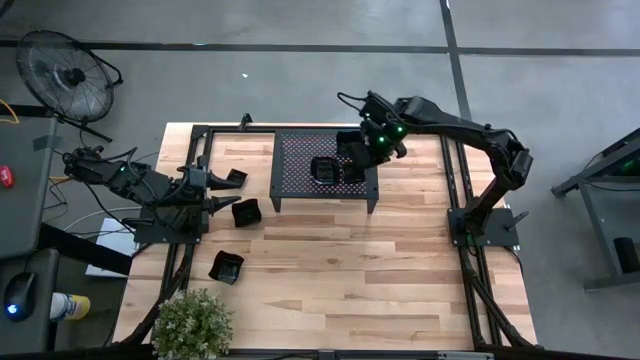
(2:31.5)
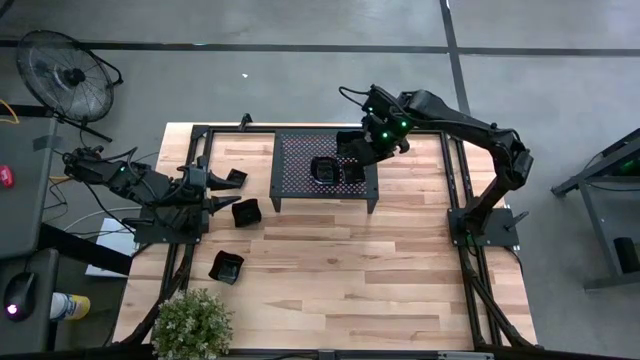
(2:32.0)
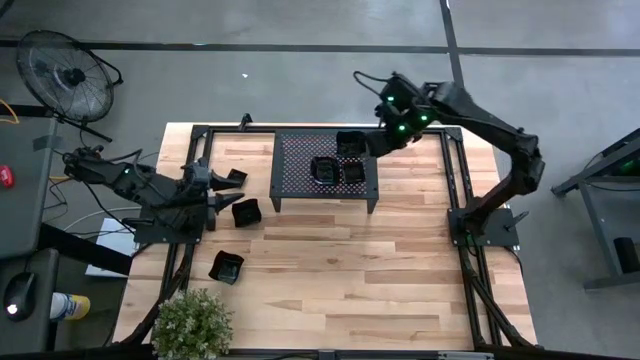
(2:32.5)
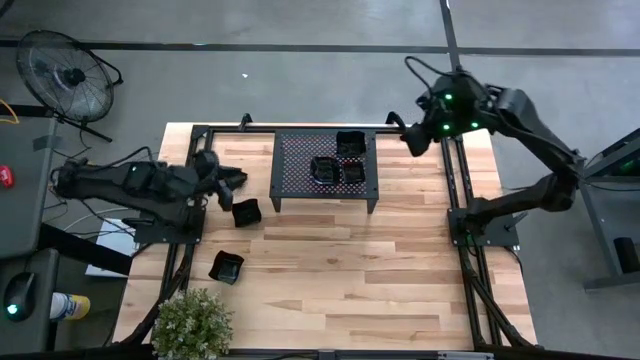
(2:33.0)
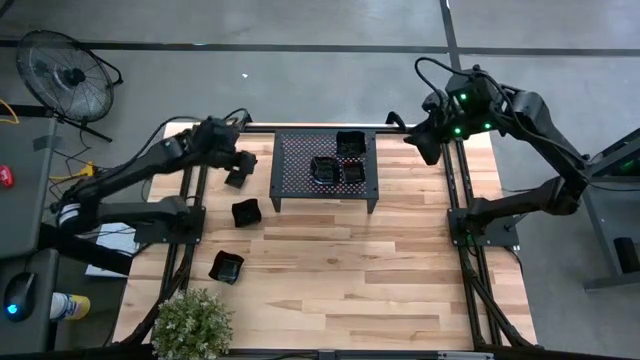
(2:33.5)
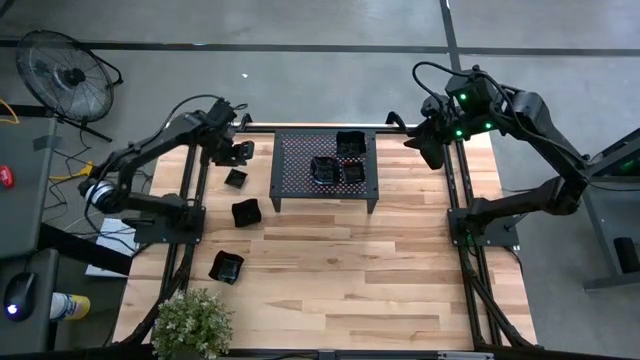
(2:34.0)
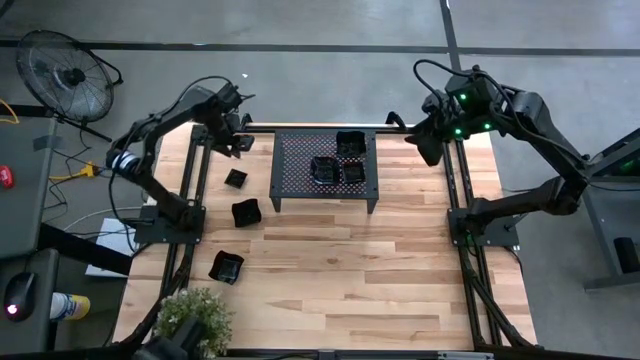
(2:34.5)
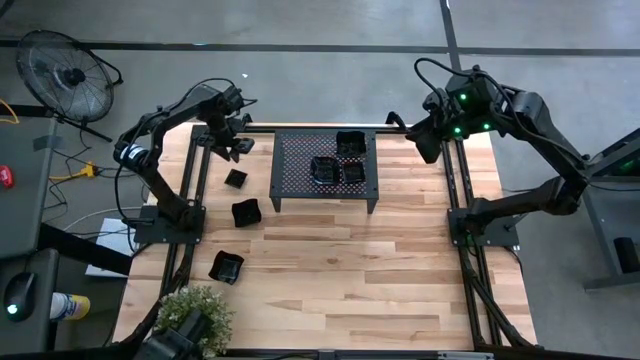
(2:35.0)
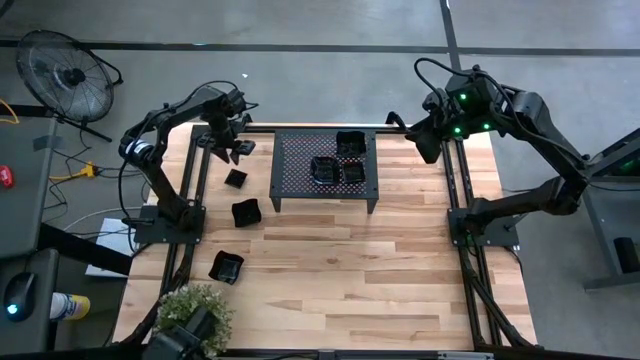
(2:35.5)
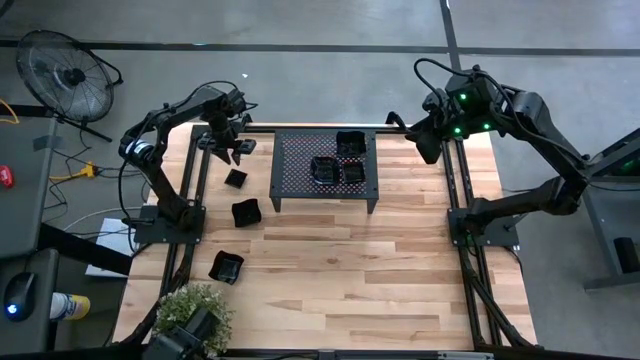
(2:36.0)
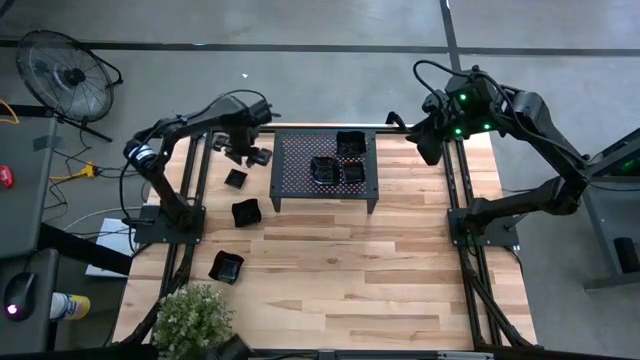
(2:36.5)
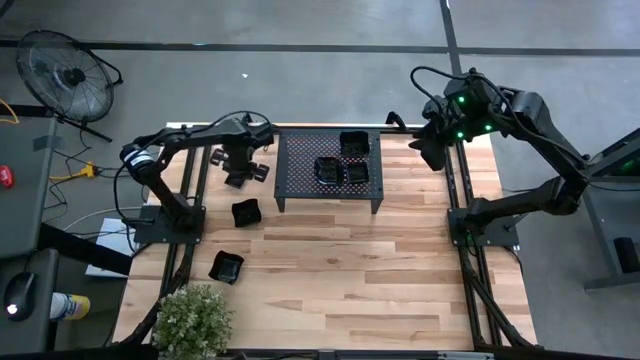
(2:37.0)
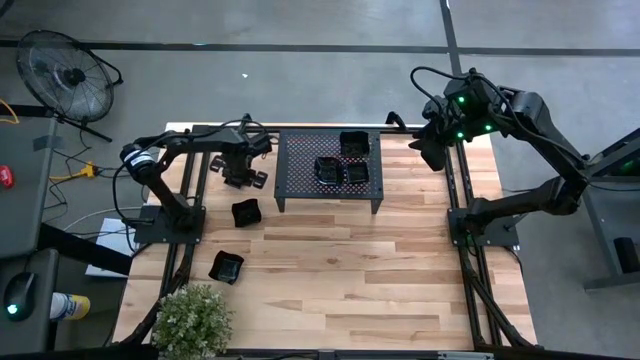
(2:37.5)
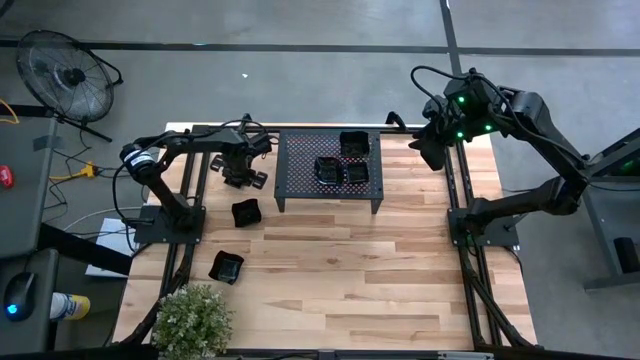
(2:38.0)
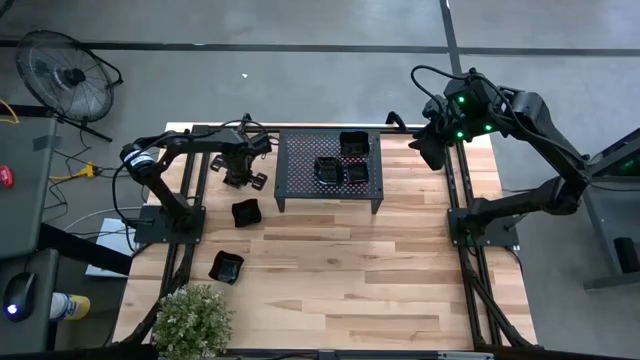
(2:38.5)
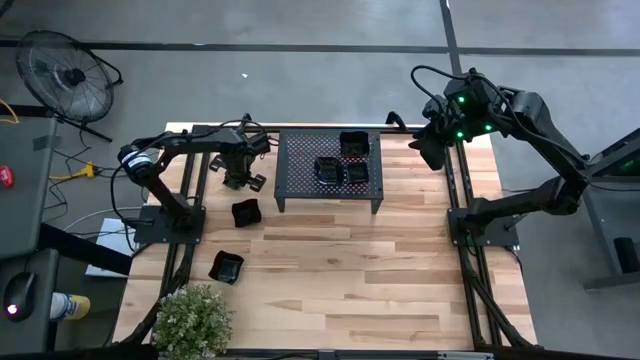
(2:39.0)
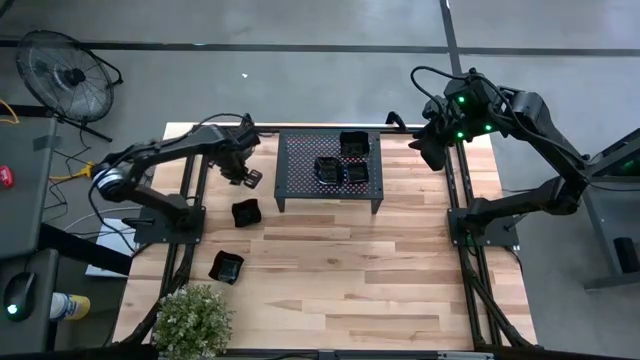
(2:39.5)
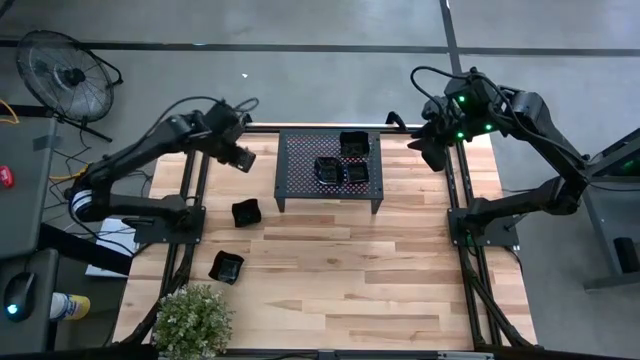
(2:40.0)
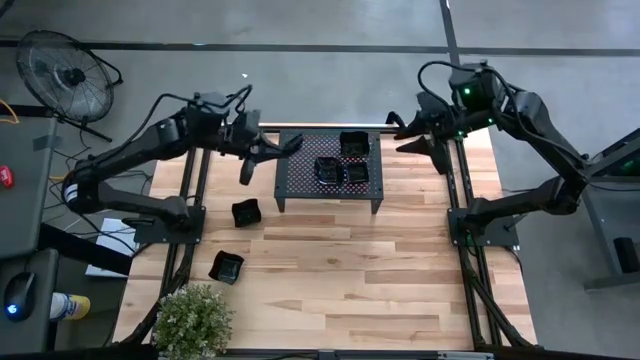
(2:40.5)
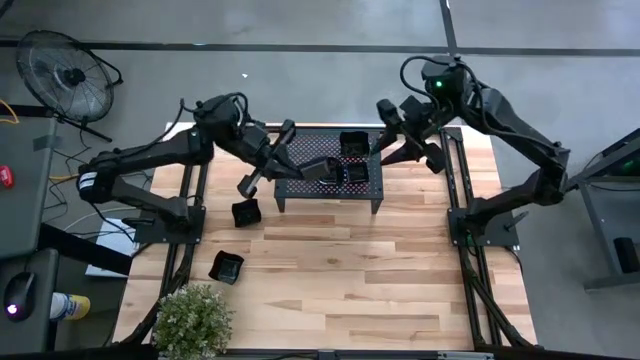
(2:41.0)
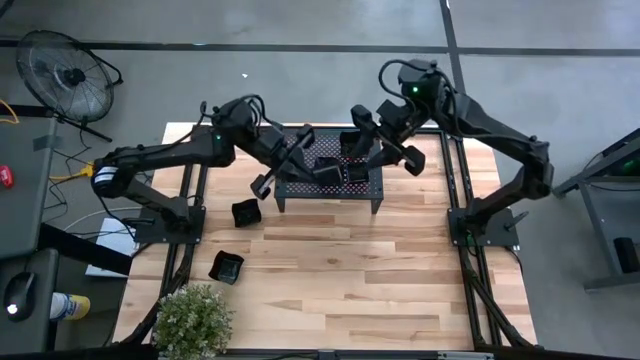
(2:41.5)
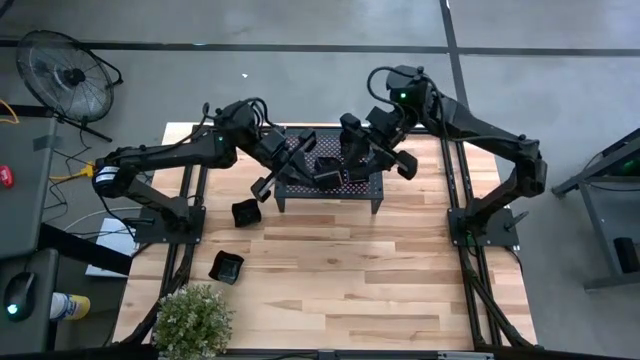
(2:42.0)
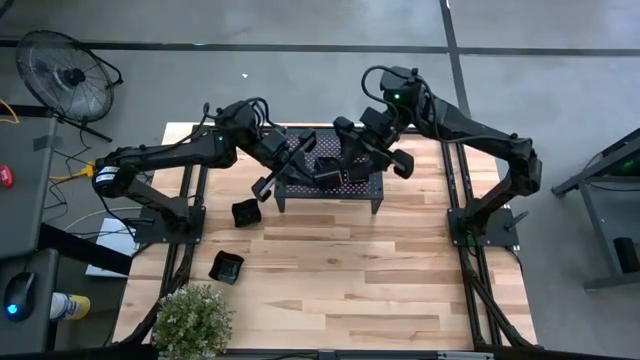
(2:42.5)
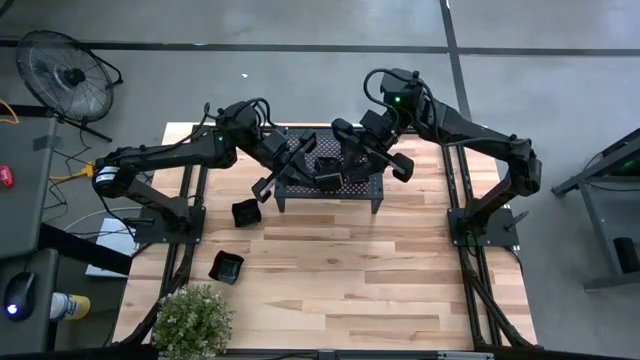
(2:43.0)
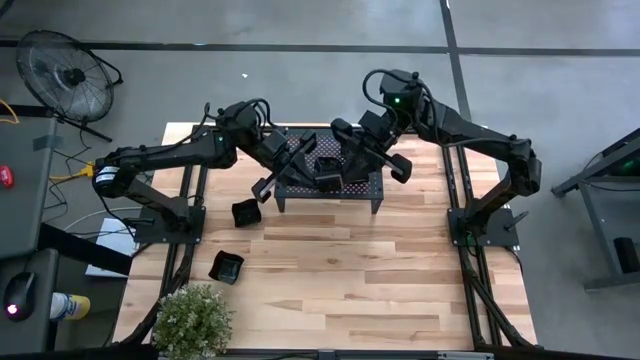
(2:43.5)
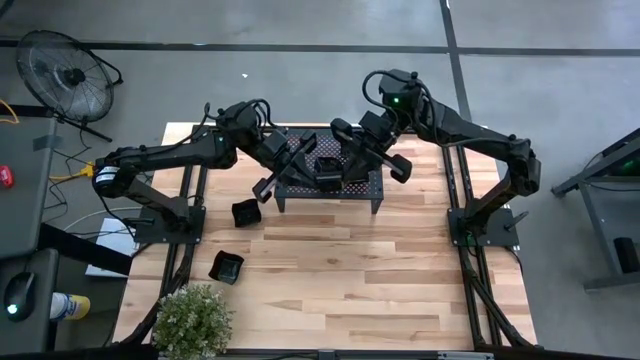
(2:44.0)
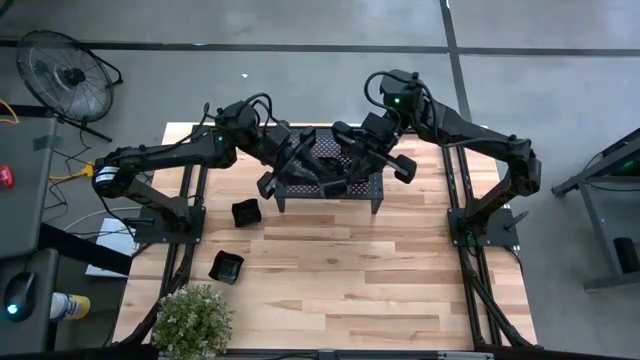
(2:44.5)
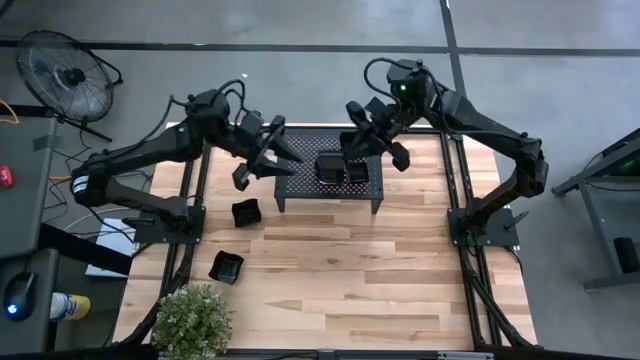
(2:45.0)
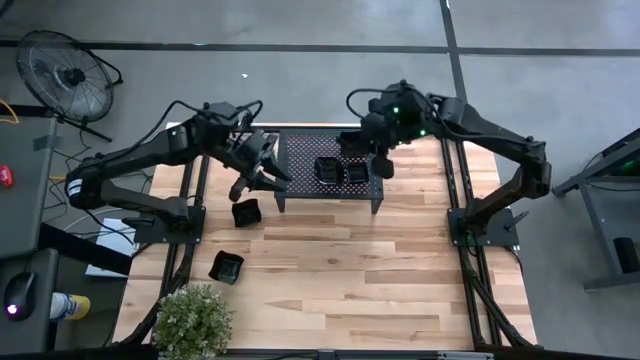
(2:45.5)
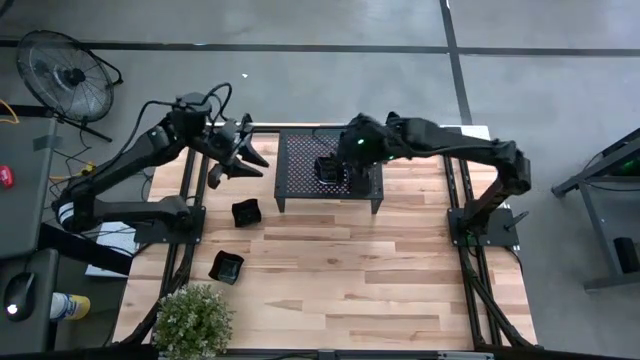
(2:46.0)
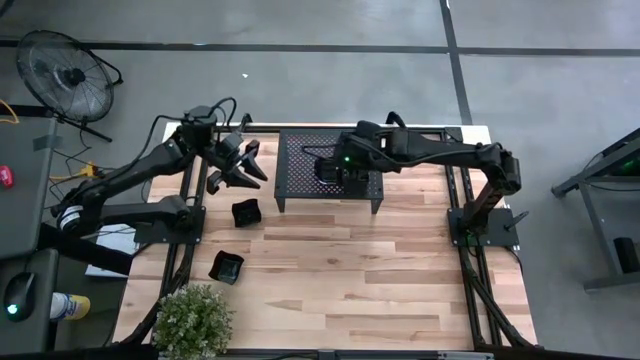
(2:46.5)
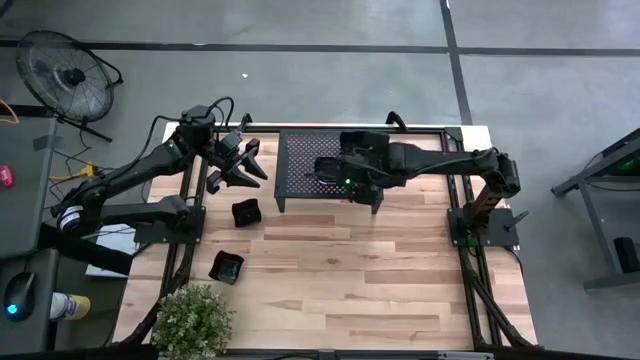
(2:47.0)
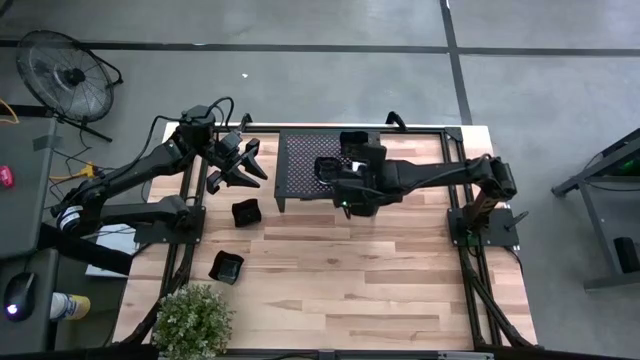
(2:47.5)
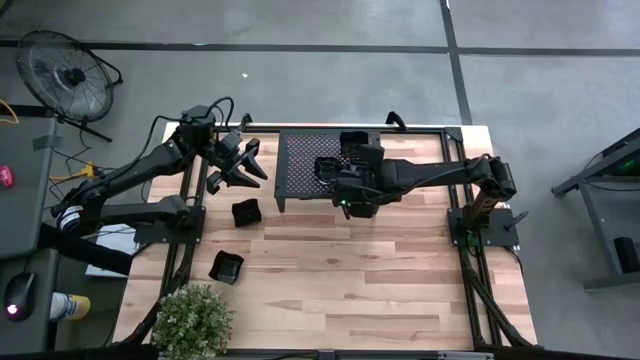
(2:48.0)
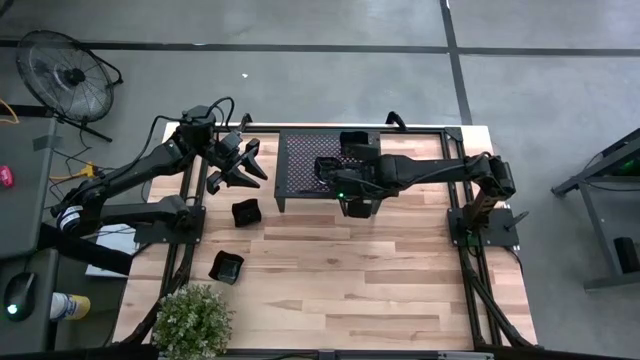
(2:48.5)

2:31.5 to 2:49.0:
Task: Pick & Place Mini shaped plates
Stack the black square plate on top of the other black square plates on the shelf

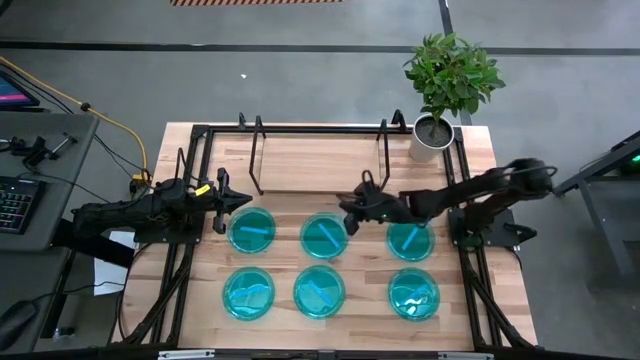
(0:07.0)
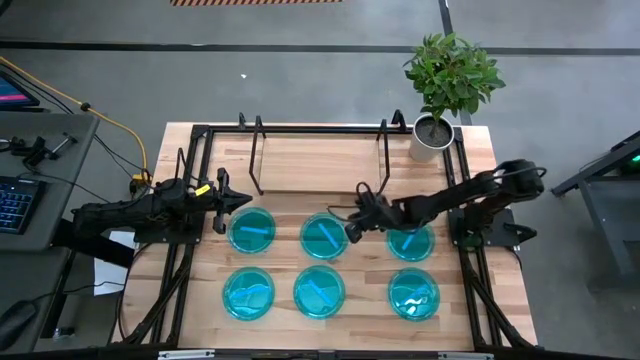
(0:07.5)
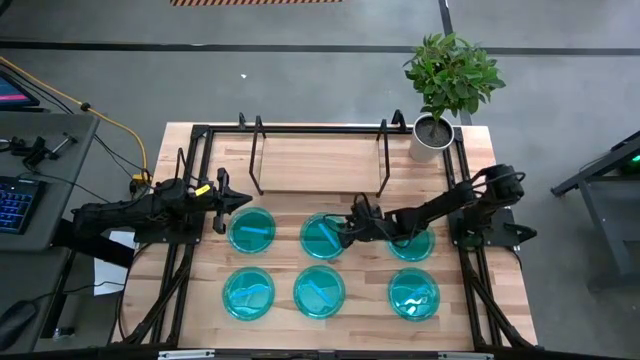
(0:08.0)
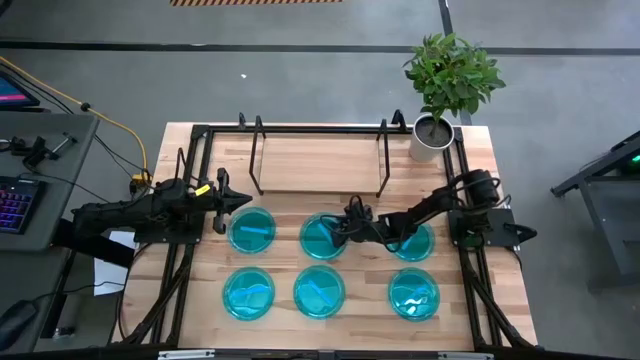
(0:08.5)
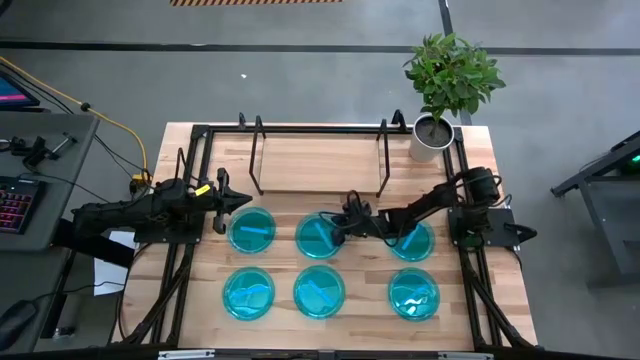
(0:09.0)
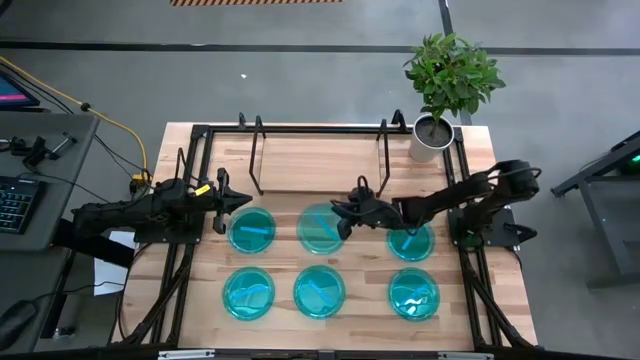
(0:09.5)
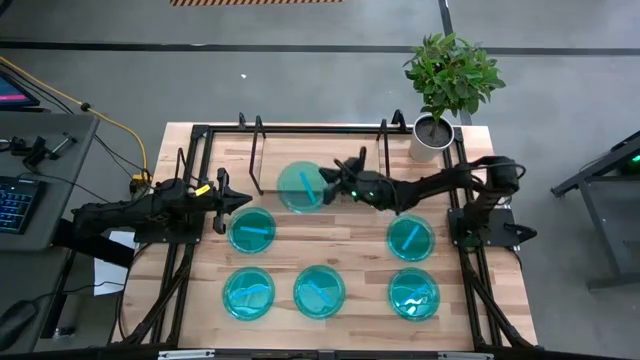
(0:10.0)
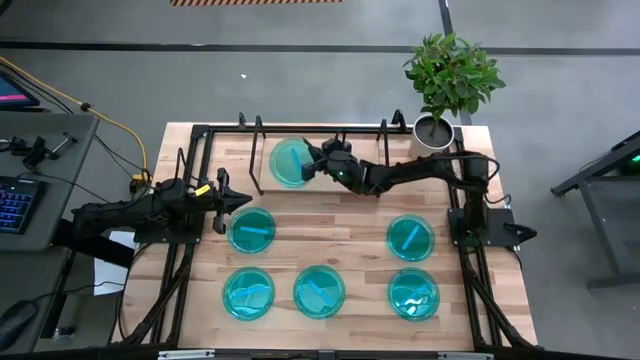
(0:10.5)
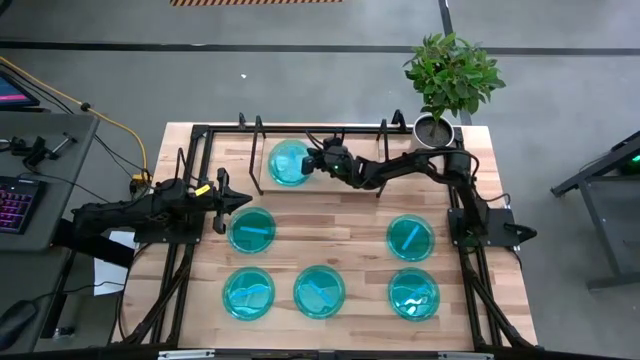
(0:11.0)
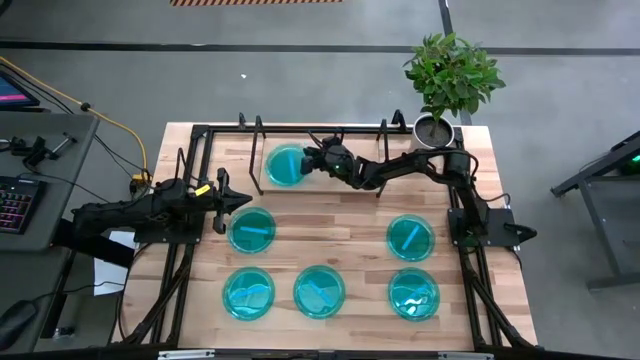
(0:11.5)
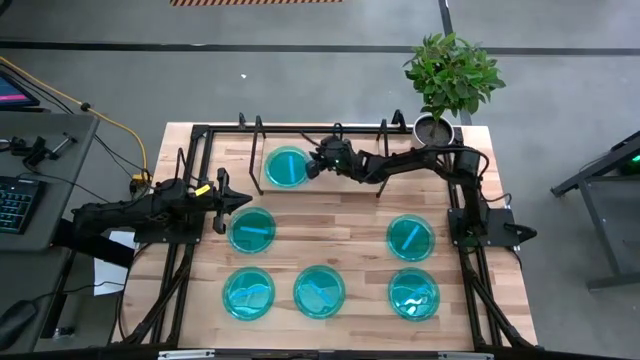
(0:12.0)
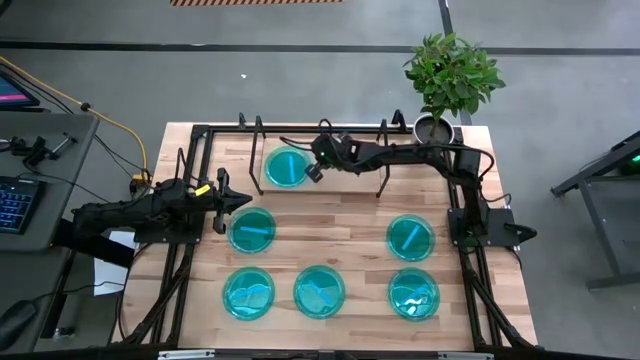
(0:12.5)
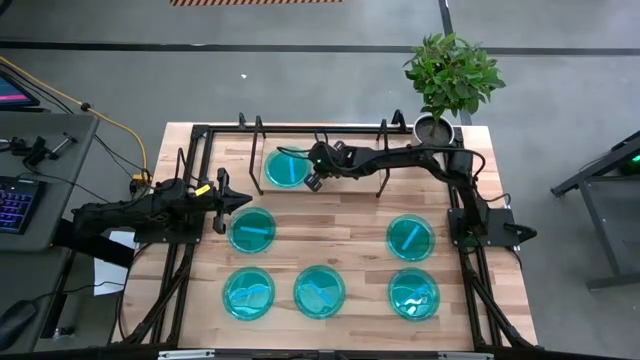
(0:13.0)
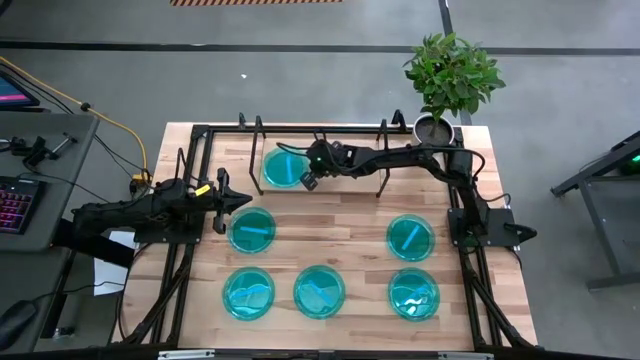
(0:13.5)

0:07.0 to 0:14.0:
Task: Place and stack plates onto a shelf
Put the blue plate on the shelf
